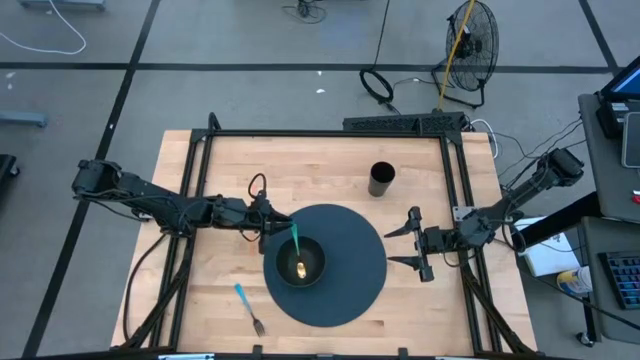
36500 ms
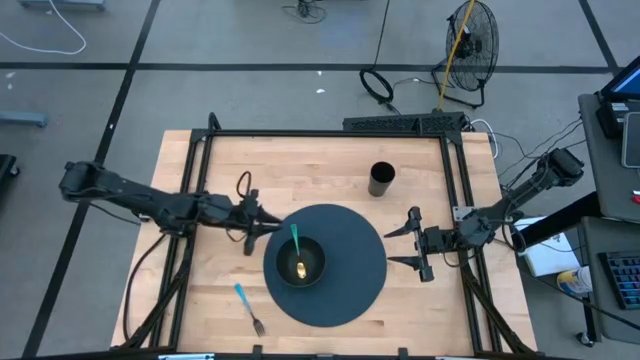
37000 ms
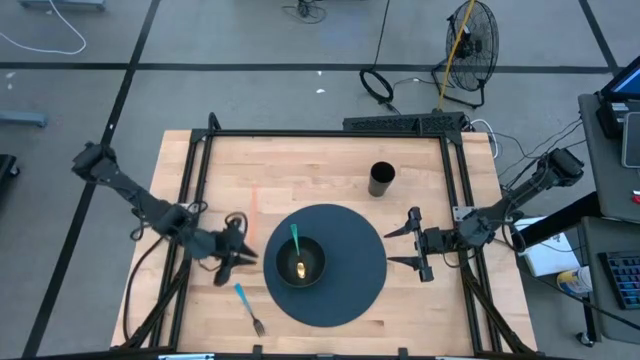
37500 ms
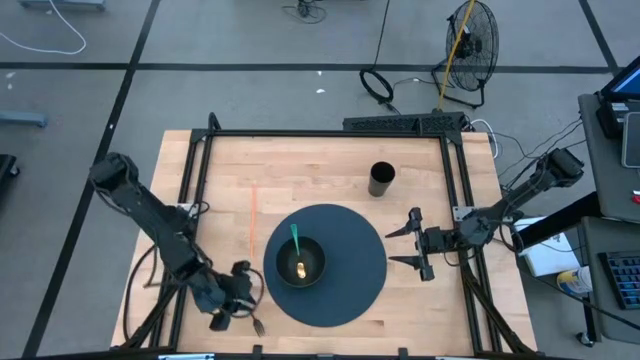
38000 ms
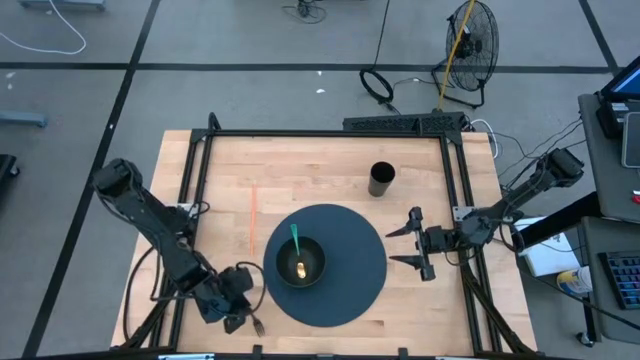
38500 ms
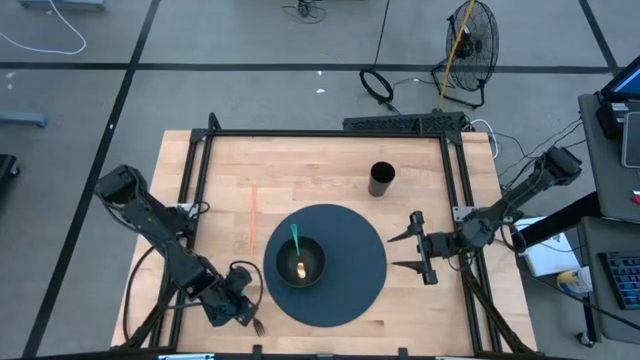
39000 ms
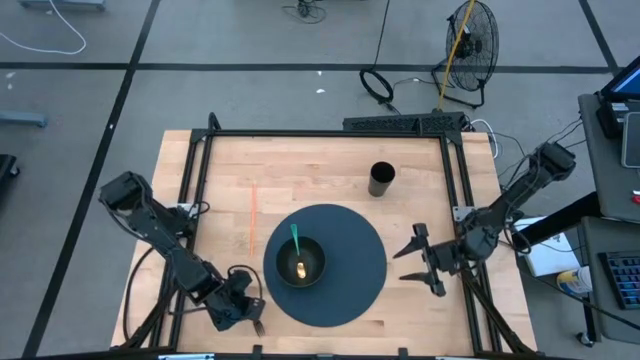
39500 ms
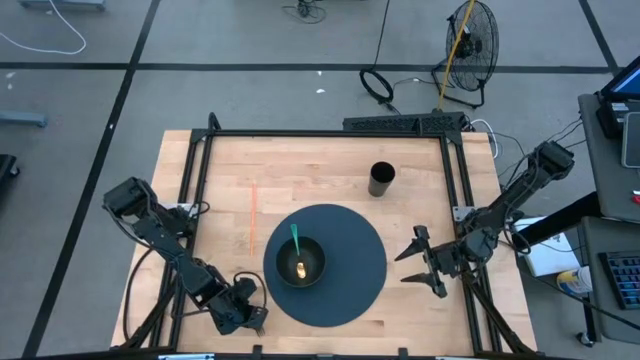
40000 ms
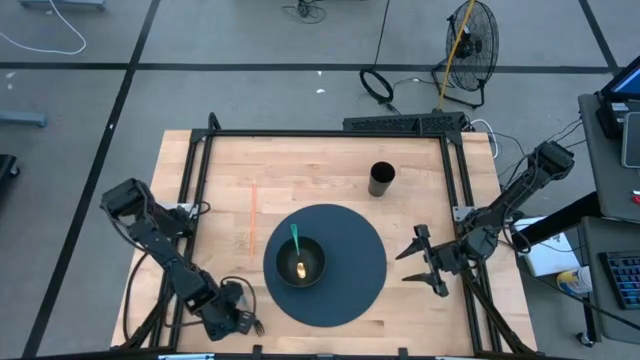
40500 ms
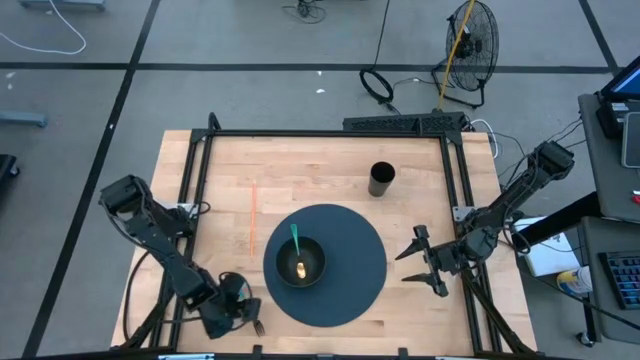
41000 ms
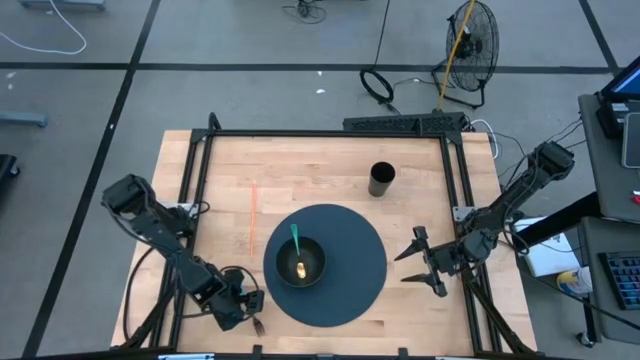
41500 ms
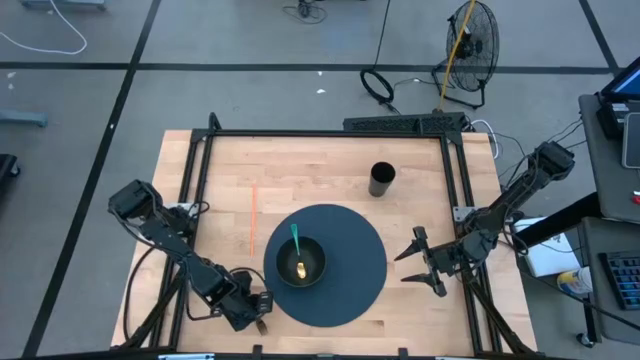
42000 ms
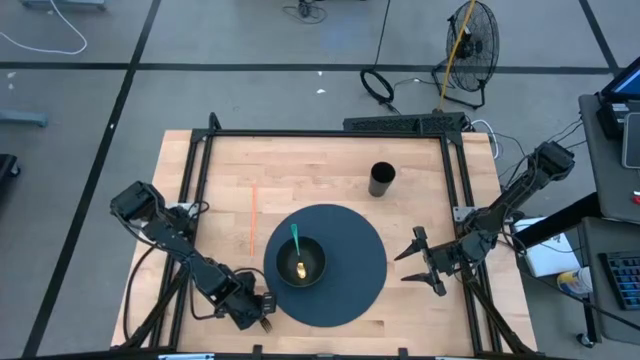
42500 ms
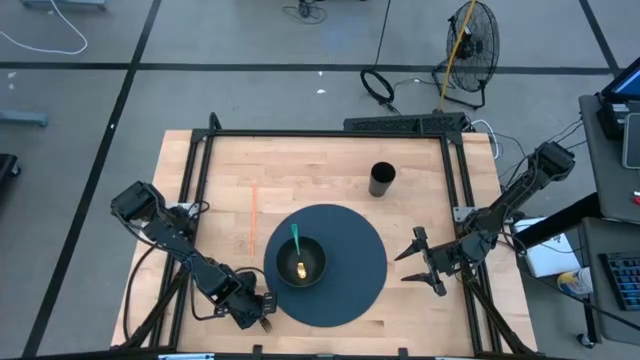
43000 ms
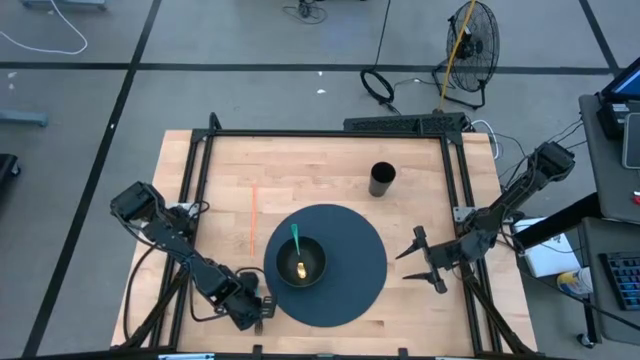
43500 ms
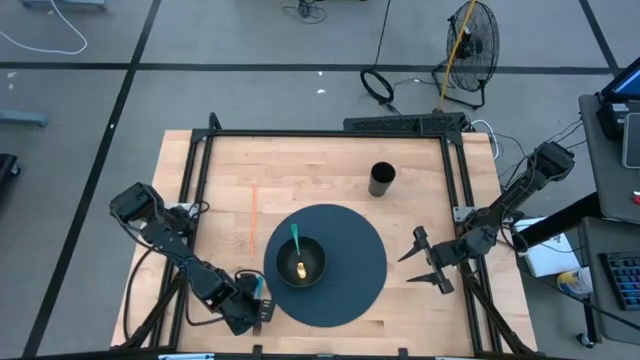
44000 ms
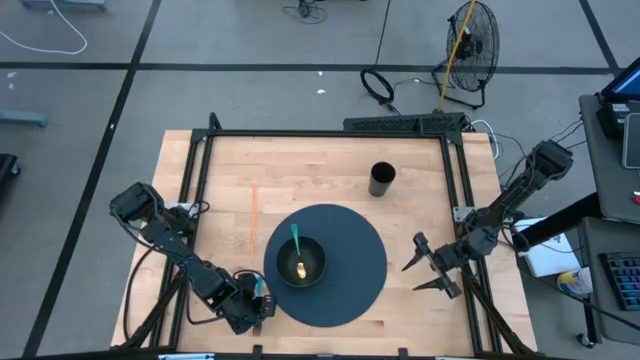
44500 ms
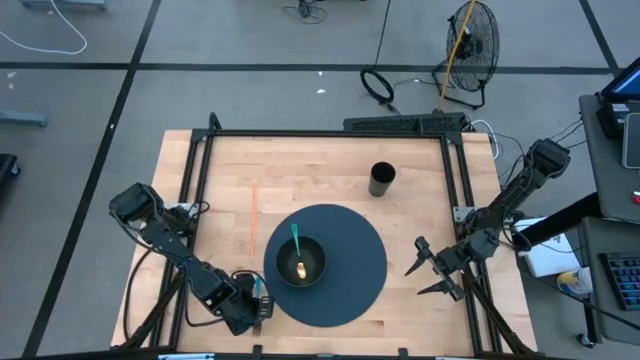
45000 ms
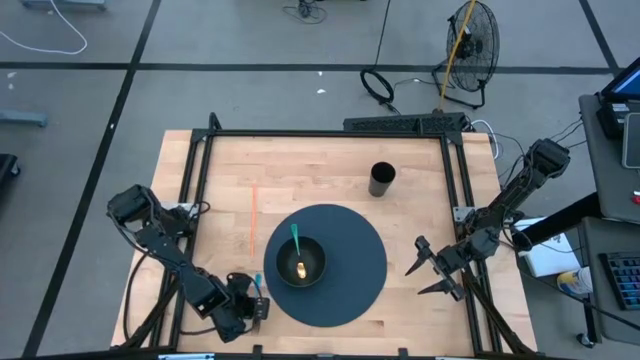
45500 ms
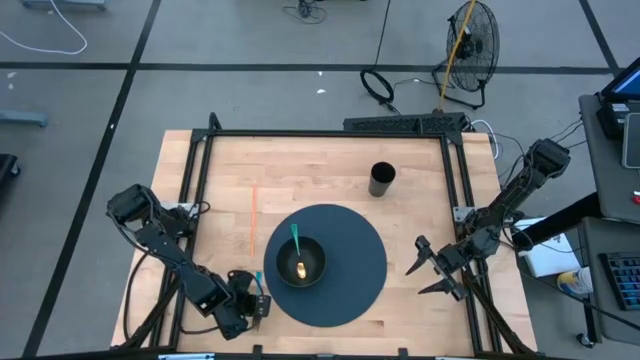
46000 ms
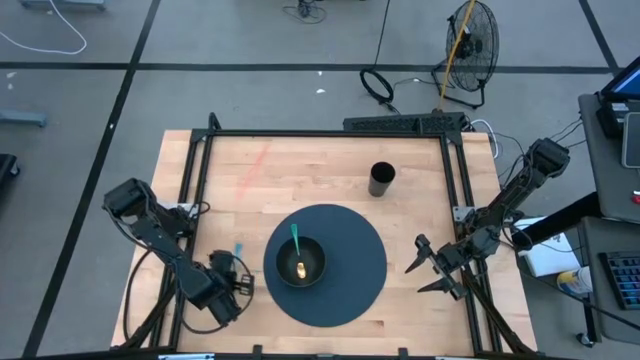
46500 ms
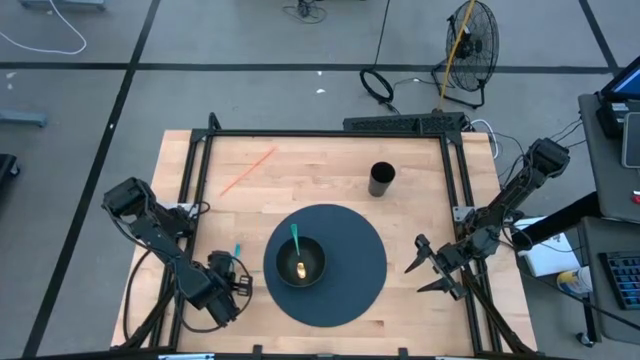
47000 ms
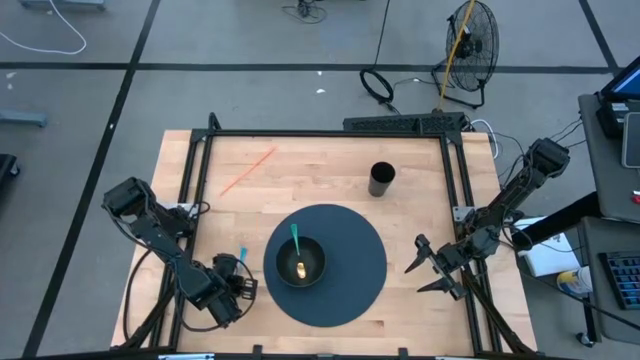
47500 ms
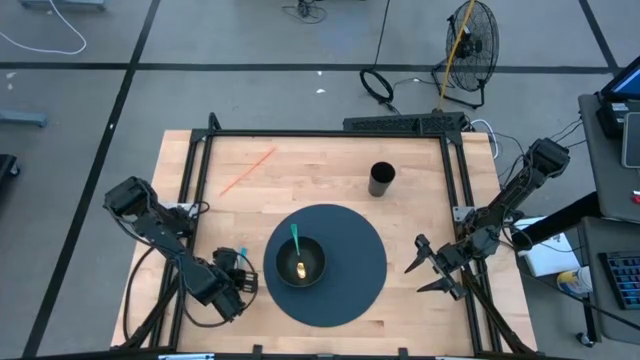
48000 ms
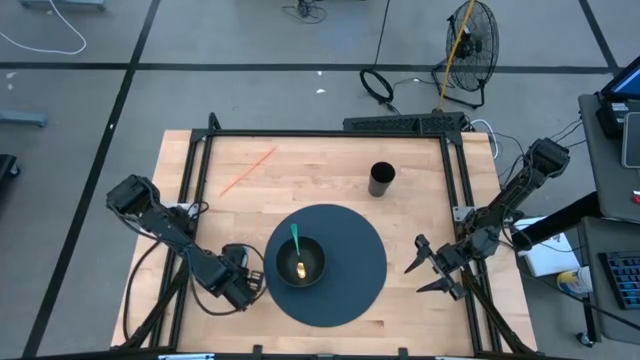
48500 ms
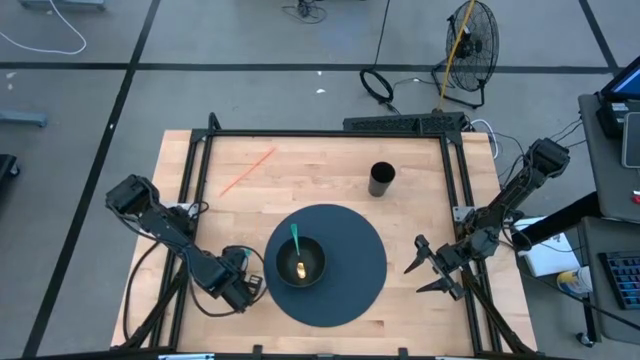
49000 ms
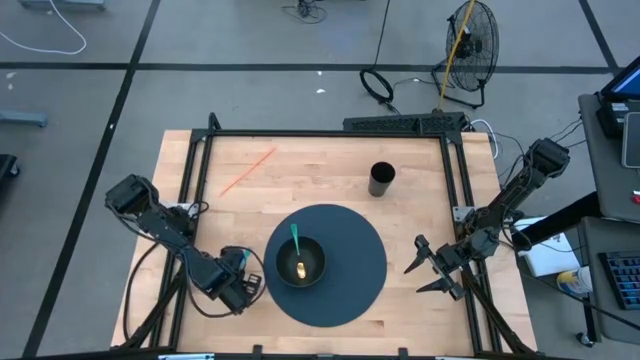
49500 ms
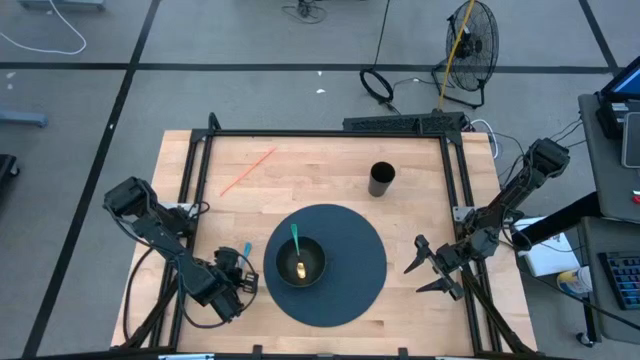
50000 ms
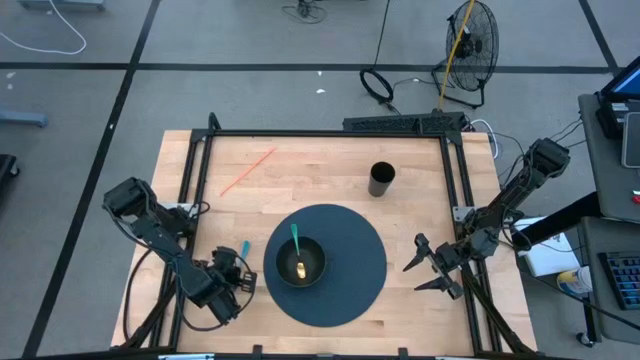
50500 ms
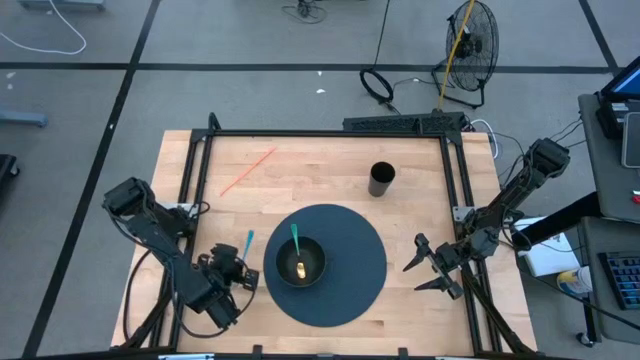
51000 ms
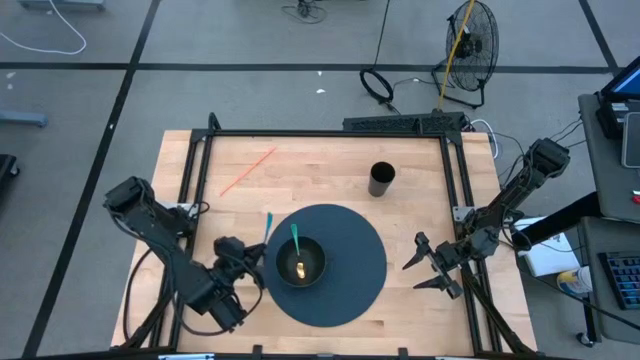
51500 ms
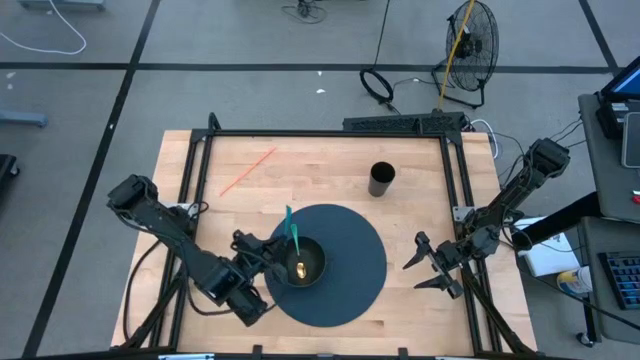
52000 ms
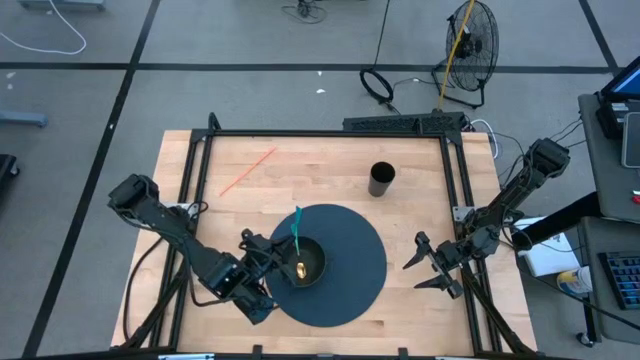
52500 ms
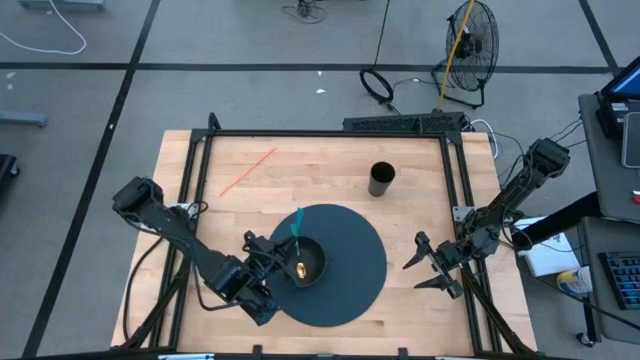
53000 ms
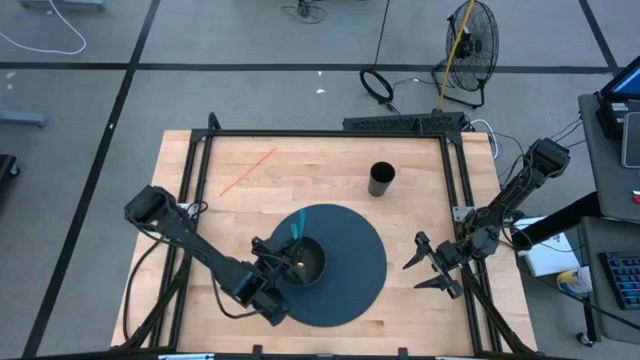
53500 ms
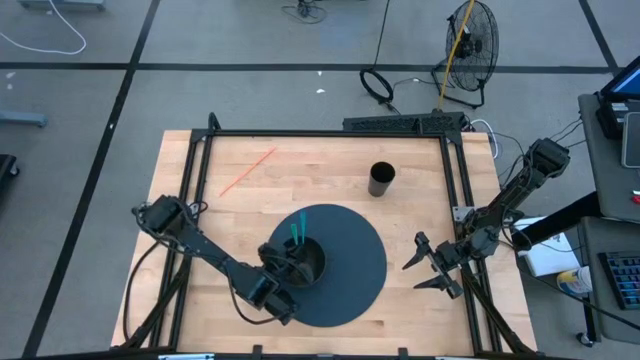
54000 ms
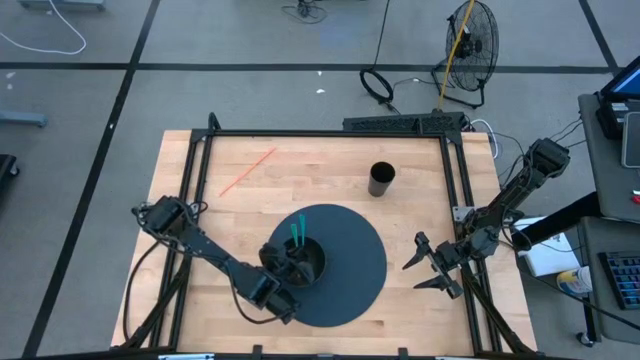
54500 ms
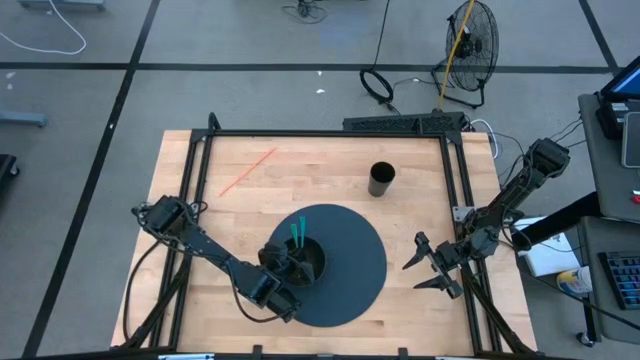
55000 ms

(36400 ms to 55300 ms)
Task: Pick & Place Utensil
Put the blue fork into the black bowl
